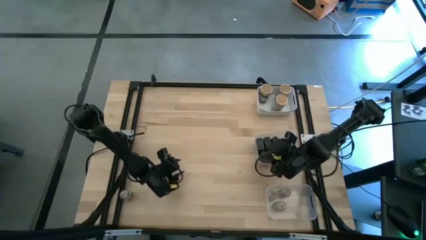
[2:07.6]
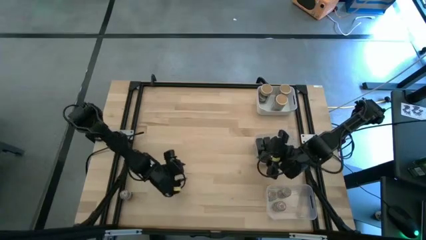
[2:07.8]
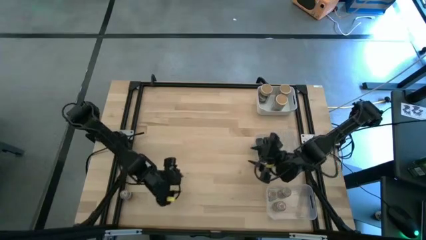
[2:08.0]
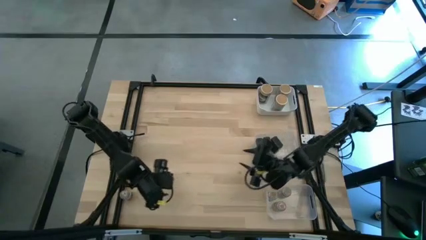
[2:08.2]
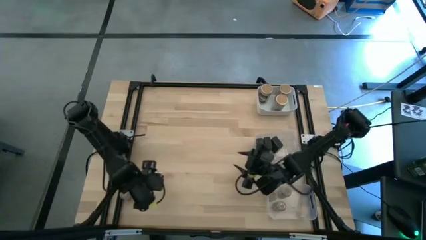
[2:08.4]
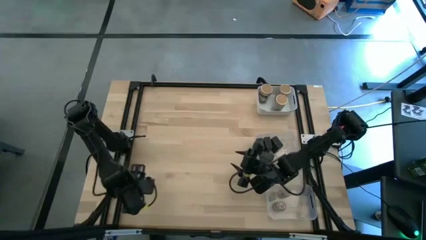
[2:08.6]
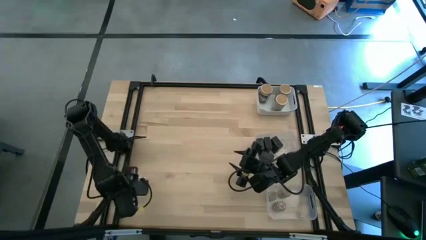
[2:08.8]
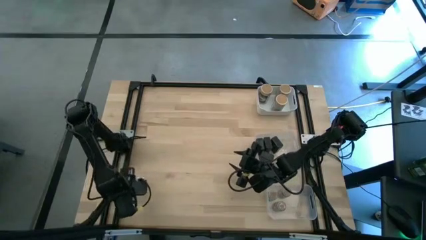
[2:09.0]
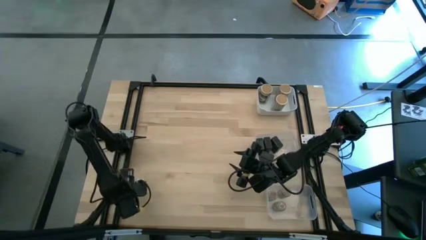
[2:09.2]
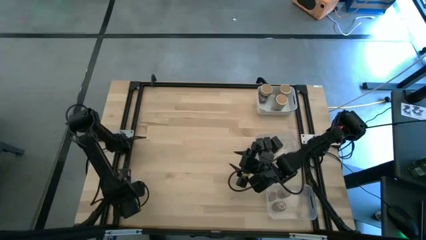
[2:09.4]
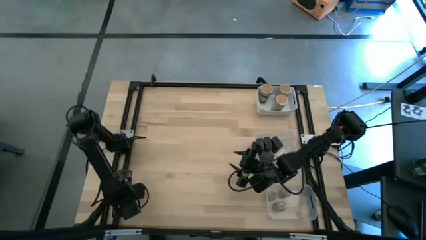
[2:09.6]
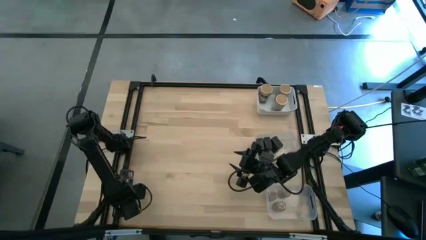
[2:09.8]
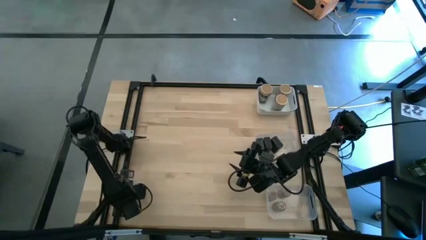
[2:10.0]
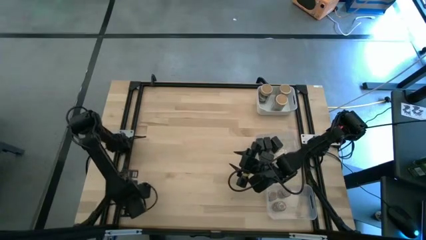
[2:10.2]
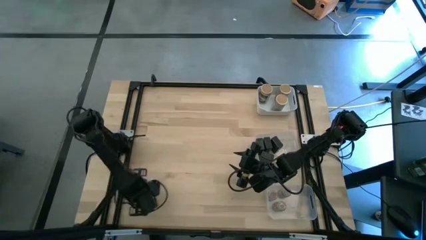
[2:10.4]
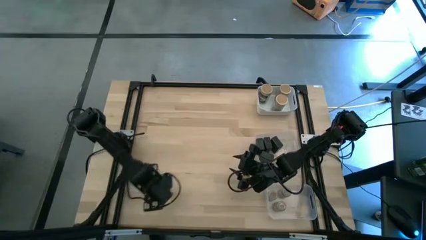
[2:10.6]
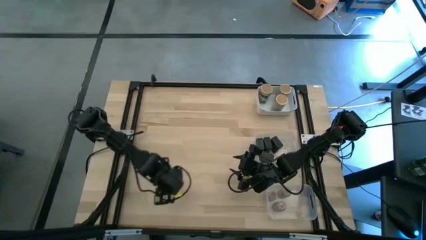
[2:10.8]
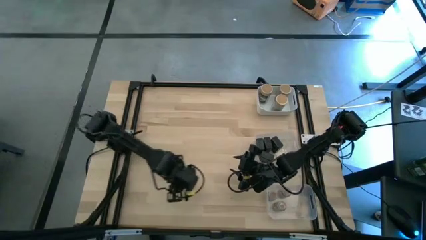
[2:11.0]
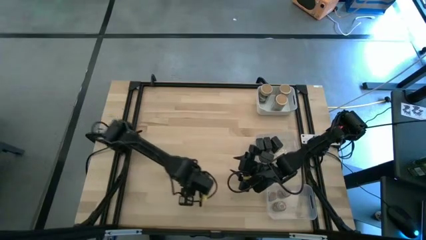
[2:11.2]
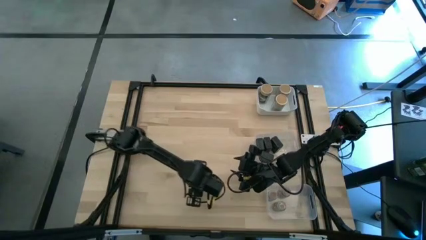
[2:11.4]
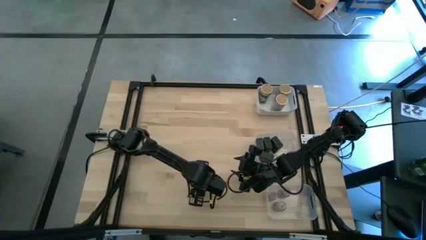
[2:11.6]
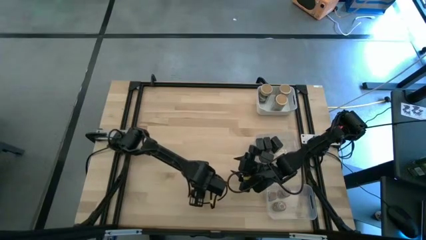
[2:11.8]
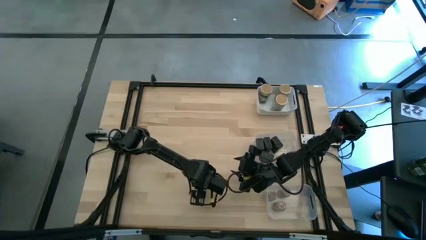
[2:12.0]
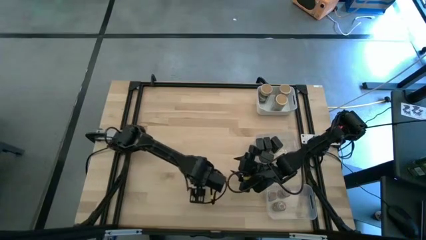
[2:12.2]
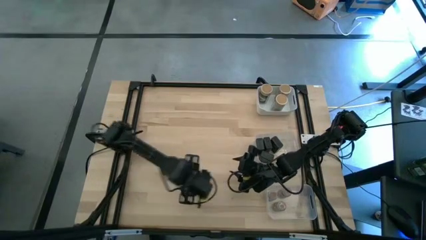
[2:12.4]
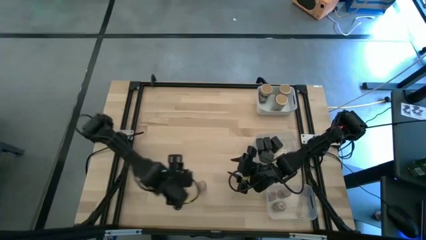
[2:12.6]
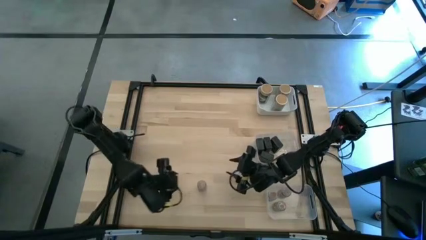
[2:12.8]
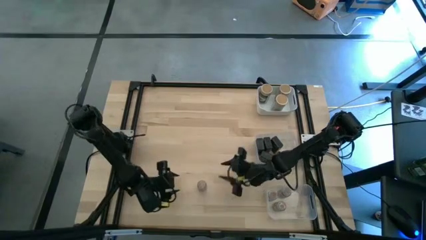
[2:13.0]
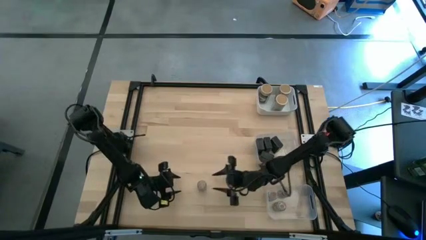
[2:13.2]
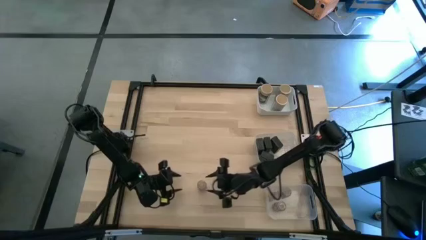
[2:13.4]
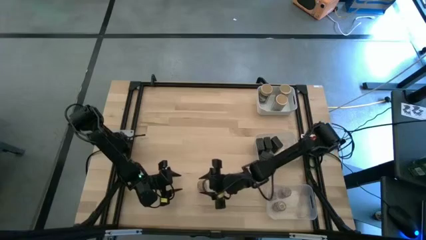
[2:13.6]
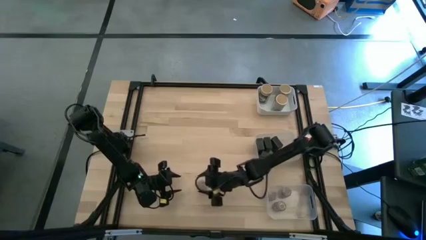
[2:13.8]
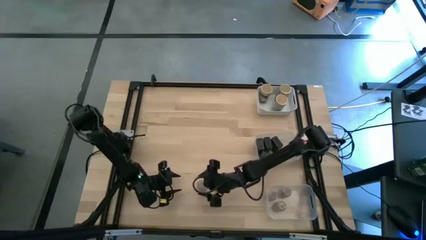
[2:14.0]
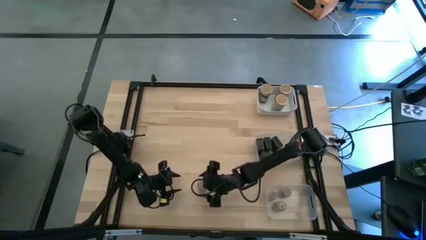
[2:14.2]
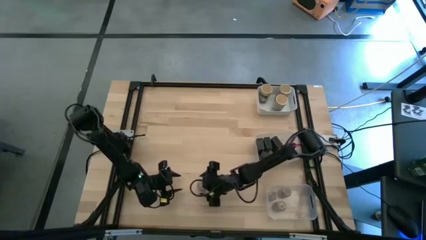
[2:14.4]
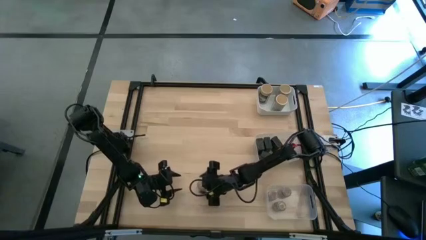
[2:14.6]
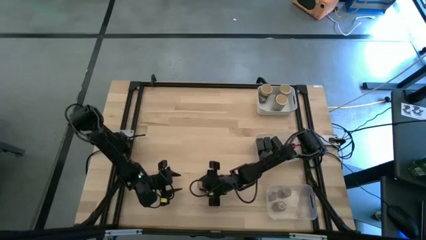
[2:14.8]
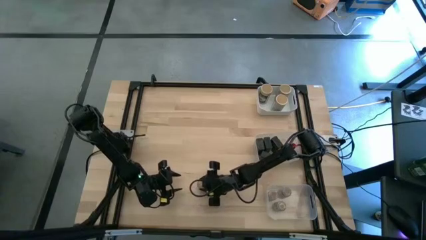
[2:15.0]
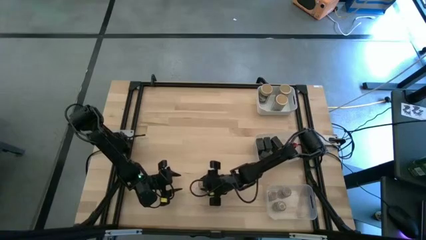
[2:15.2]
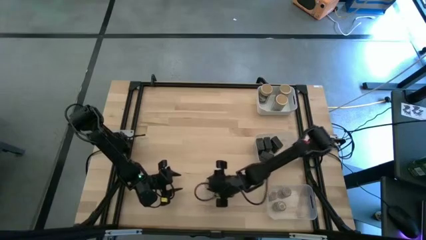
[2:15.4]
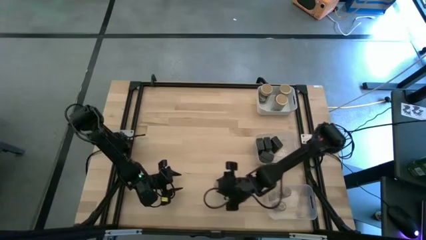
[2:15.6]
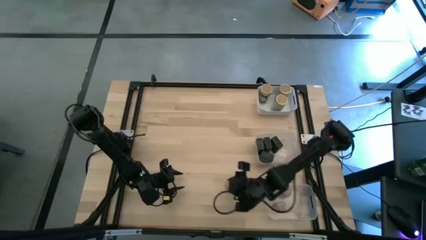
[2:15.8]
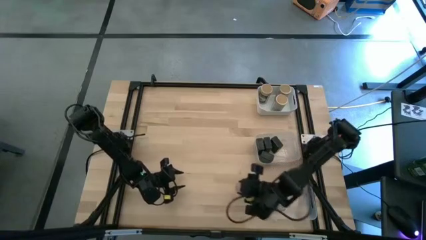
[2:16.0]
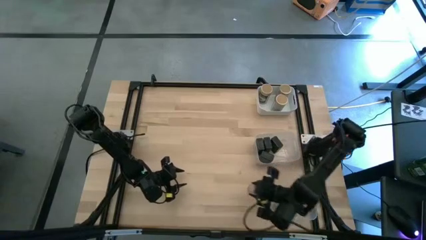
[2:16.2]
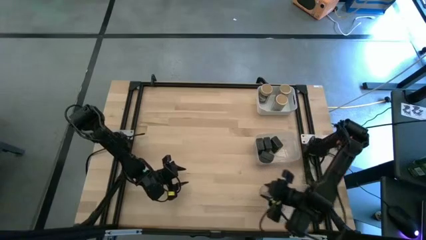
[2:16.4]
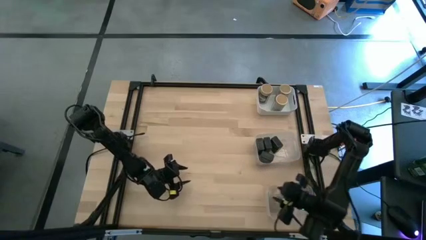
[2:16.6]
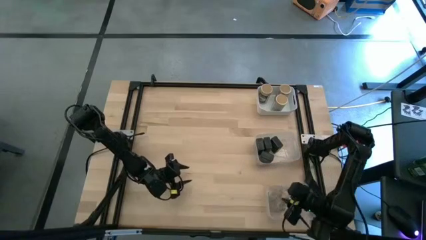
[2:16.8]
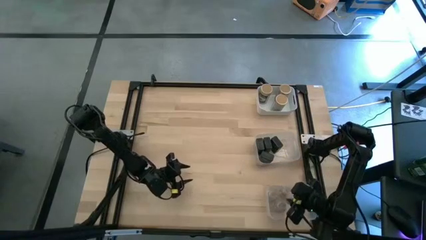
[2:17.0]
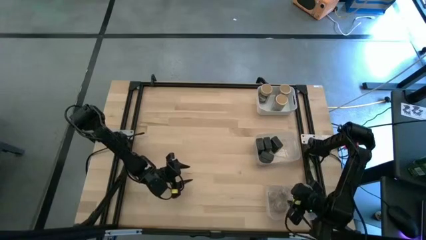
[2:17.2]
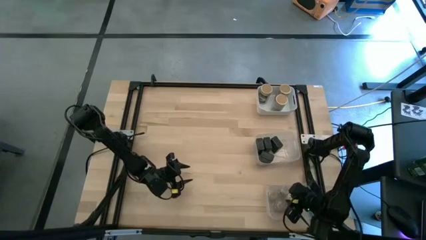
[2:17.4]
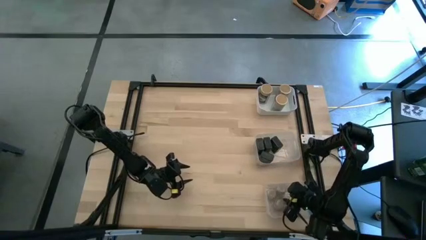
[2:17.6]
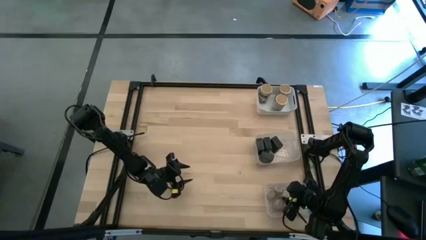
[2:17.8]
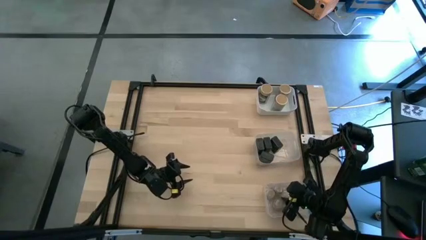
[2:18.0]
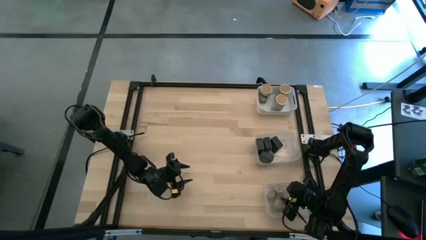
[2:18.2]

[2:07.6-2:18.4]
Task: Sort spices by type
Put the transparent seasoning bottle into the bottom transparent bin

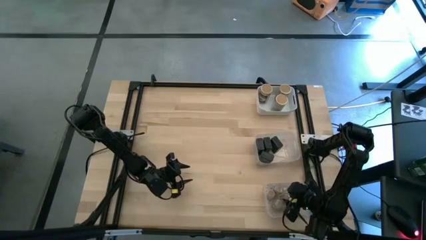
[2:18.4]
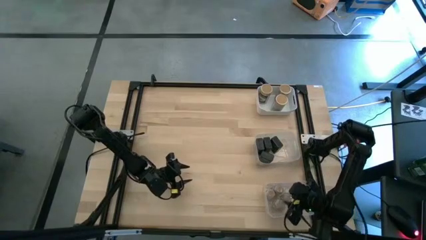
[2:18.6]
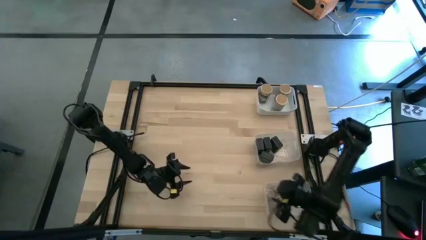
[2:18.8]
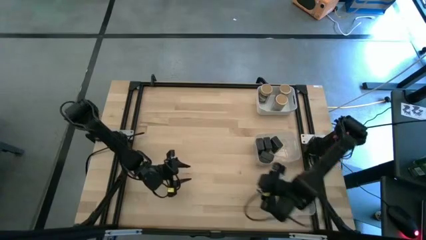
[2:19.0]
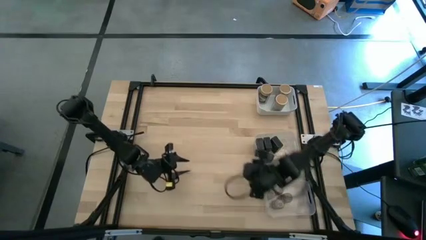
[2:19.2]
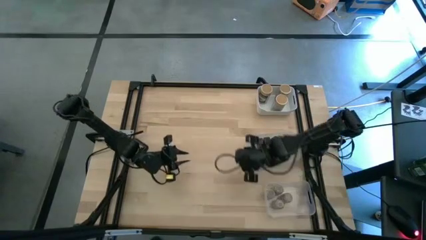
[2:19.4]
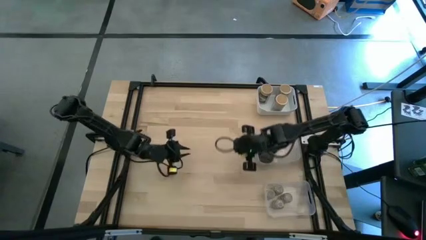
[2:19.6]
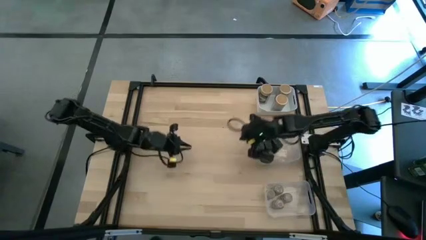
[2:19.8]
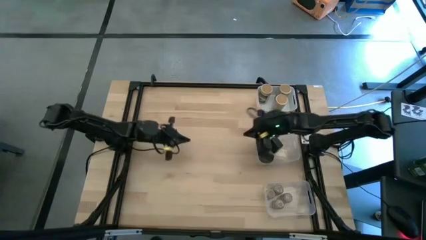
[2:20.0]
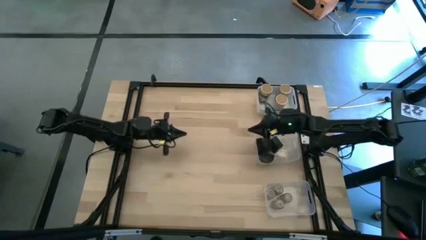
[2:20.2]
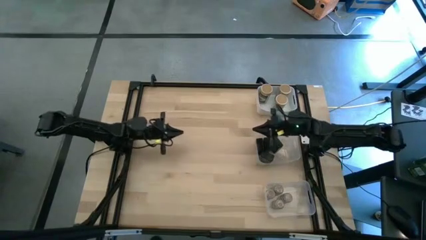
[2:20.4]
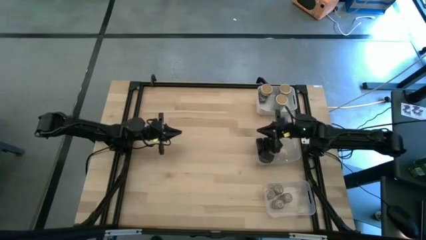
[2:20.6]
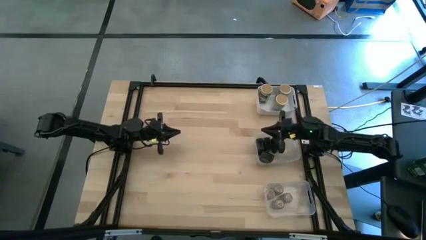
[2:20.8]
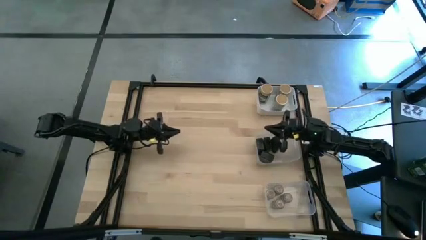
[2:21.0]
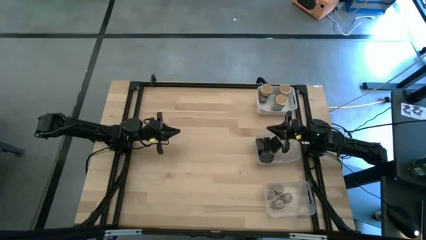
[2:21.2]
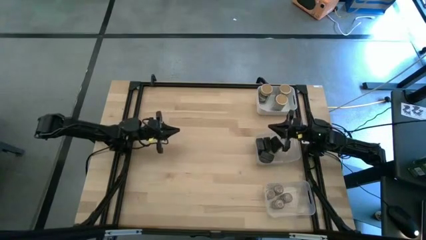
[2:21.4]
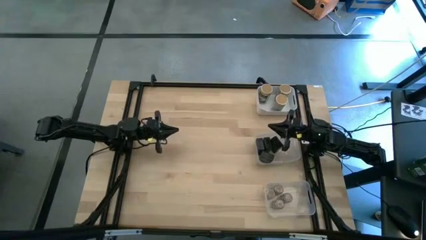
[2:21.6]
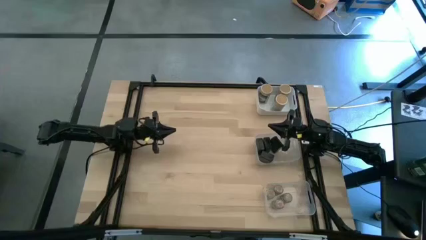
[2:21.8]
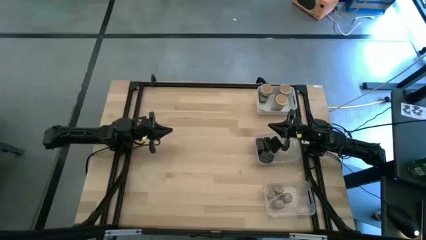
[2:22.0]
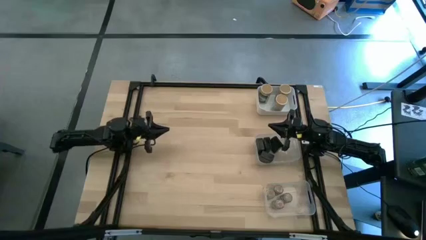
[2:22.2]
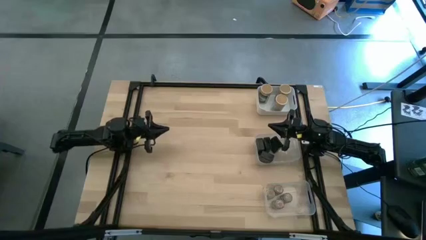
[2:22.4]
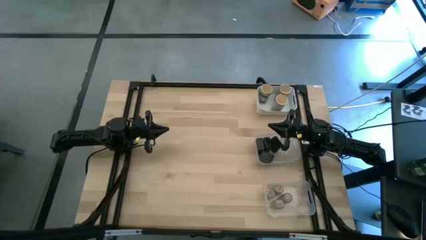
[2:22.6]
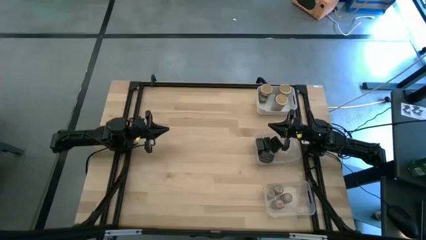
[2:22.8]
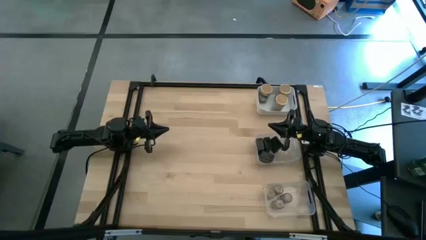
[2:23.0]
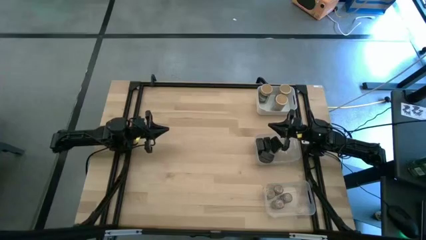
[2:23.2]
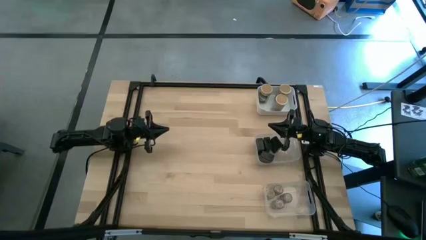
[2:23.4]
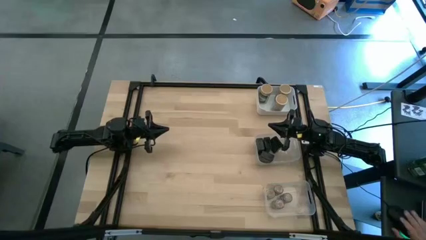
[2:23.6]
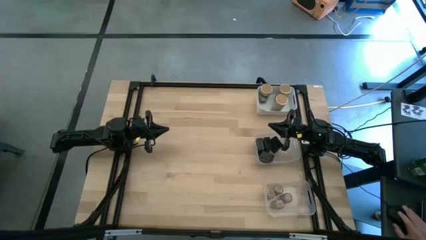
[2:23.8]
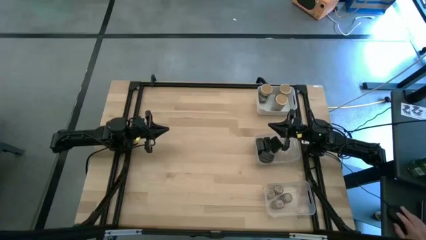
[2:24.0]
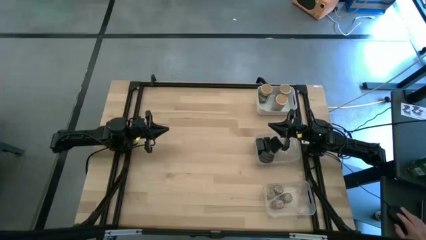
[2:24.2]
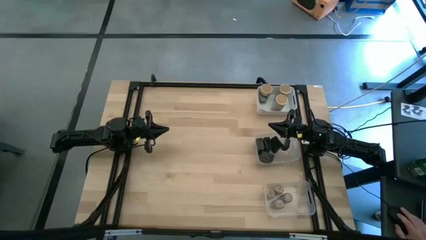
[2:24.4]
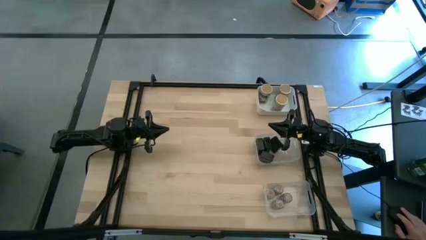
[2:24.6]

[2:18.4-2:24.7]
Return to Home Position
